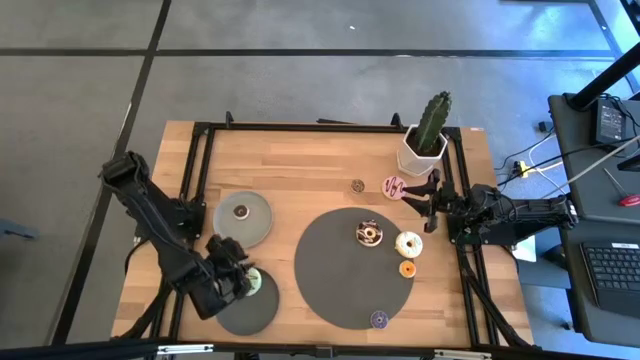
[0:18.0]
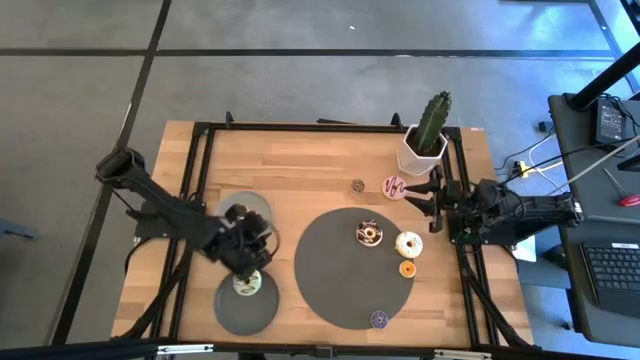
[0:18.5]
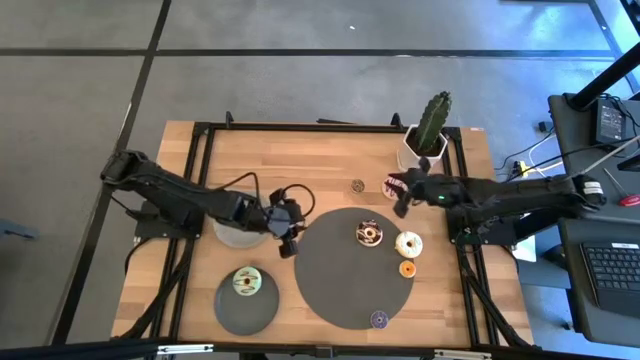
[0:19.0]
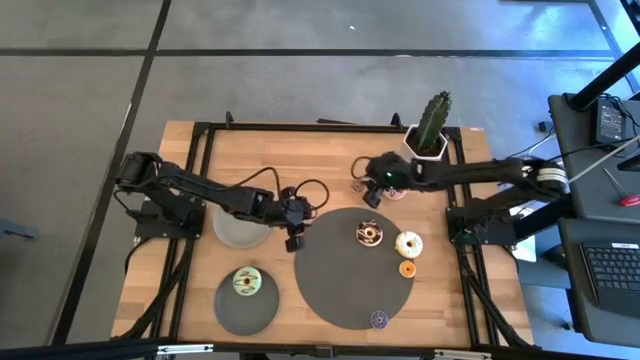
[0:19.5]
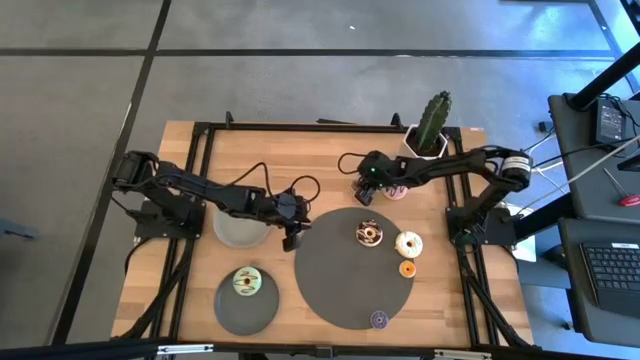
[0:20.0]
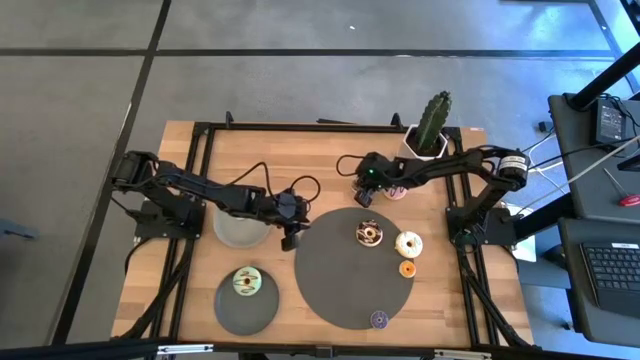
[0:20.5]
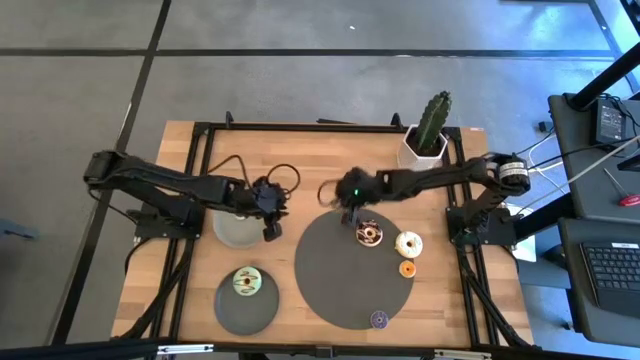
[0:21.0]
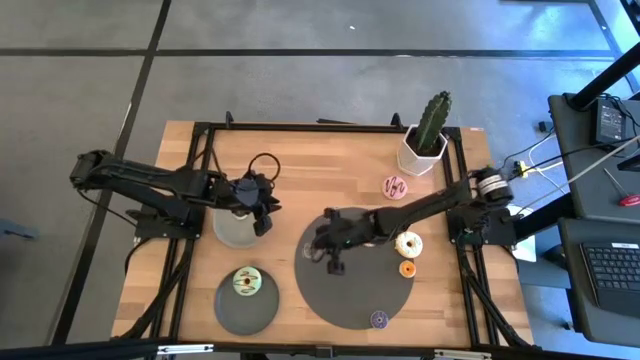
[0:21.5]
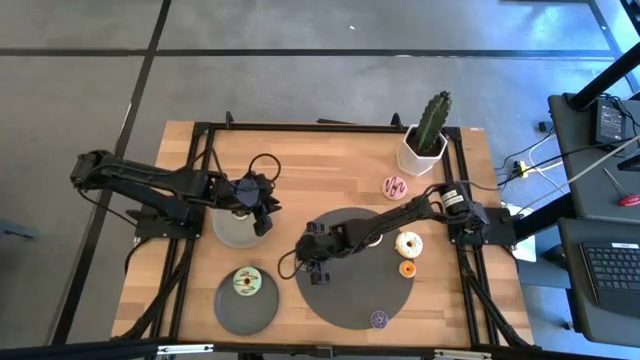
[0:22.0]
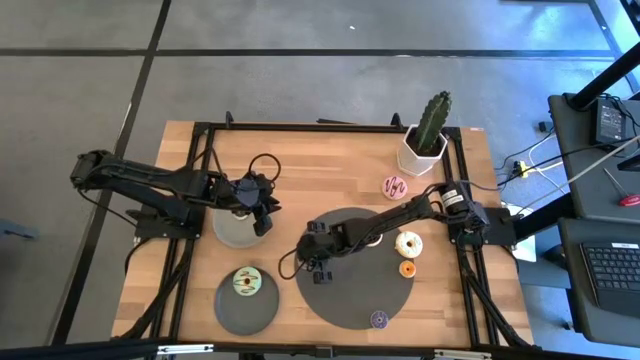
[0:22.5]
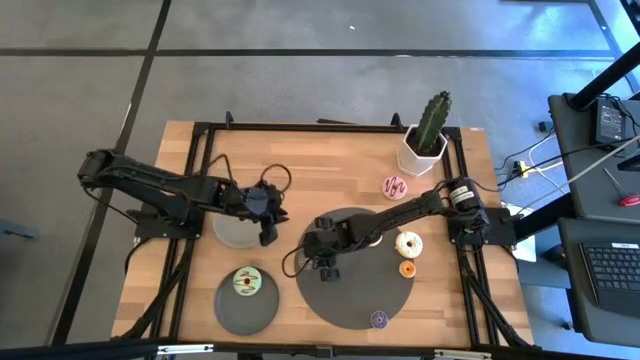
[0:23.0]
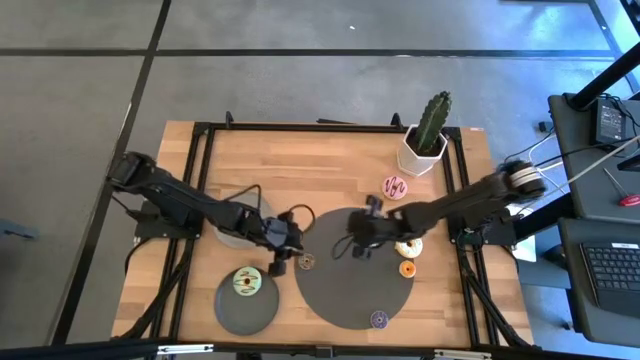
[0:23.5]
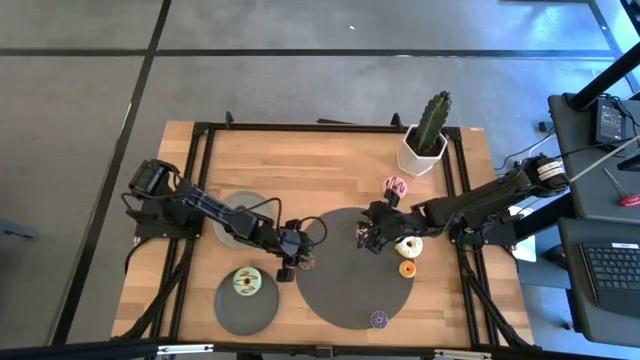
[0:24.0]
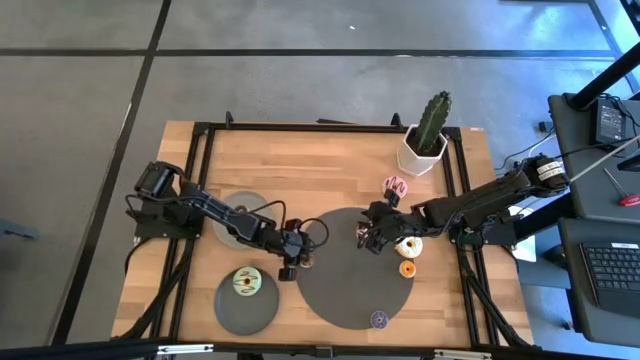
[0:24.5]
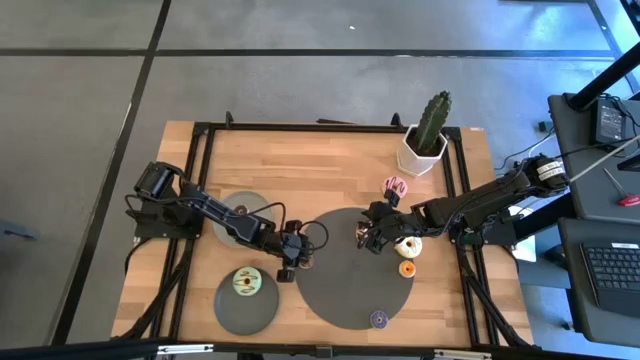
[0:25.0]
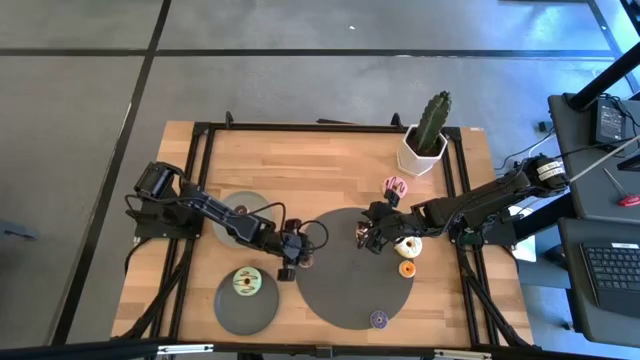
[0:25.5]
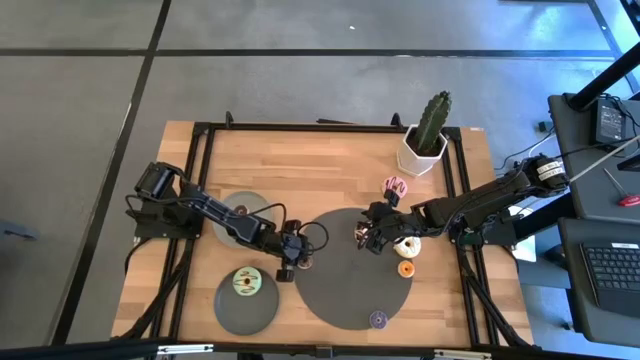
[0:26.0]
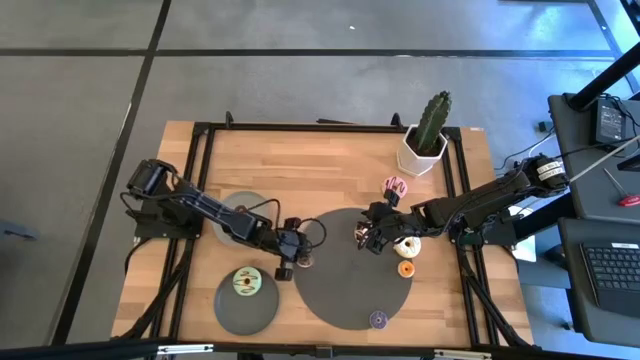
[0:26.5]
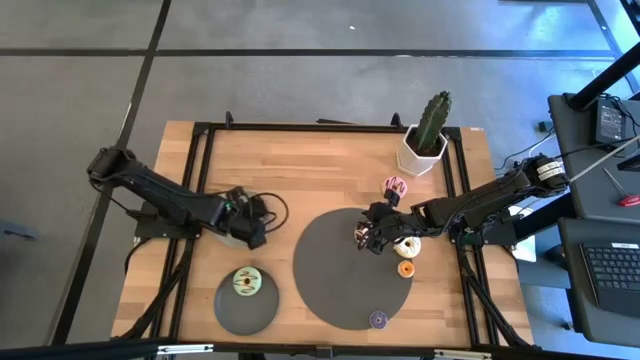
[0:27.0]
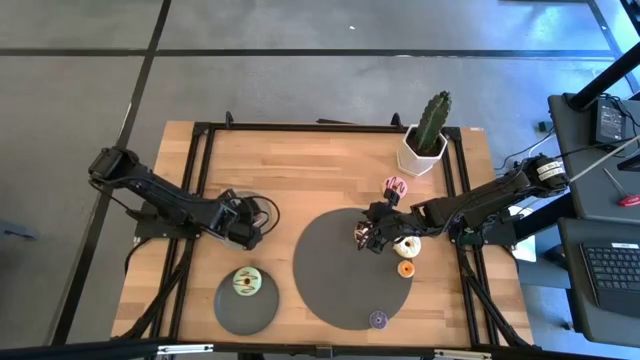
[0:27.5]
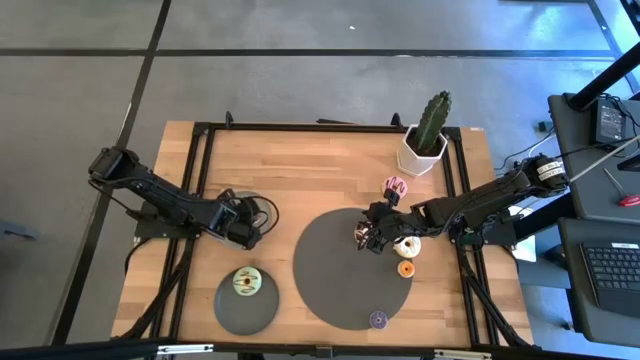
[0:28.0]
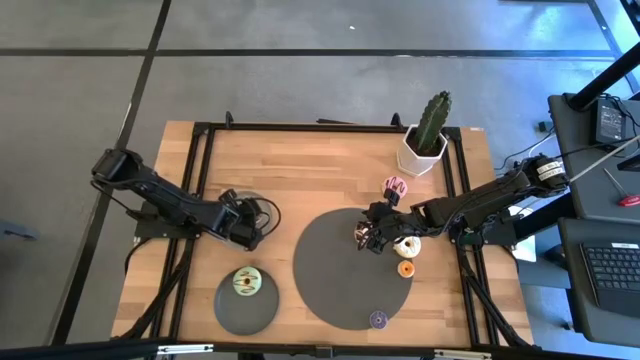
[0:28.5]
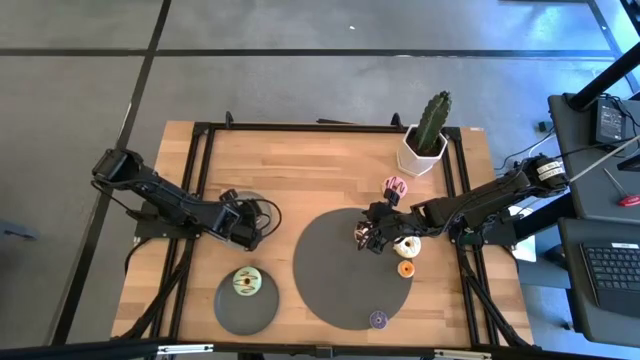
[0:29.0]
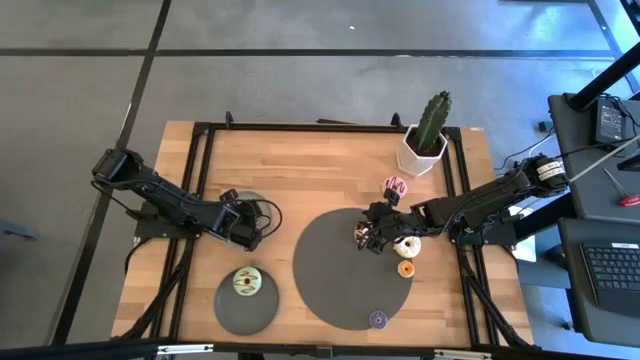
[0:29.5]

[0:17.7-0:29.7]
Task: Pick & Place donuts
Put the small brown donut on the gray plate

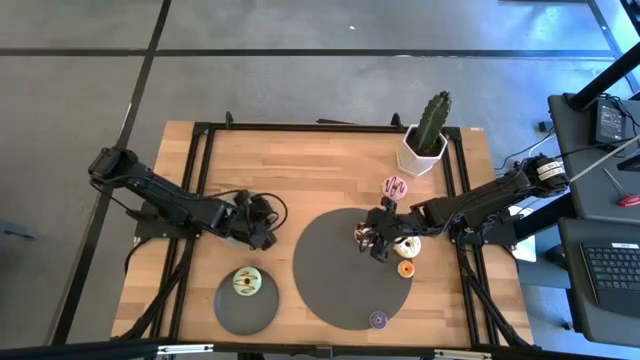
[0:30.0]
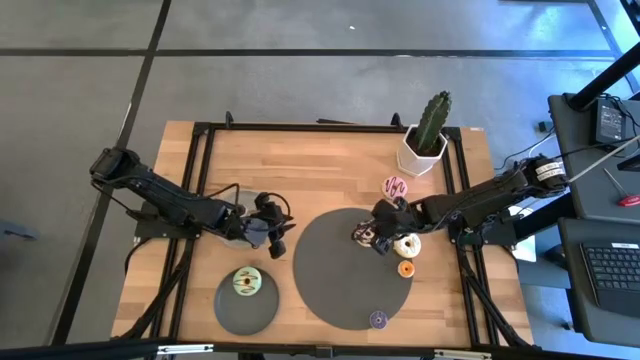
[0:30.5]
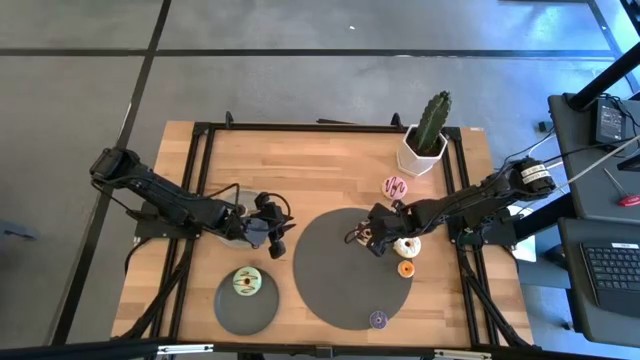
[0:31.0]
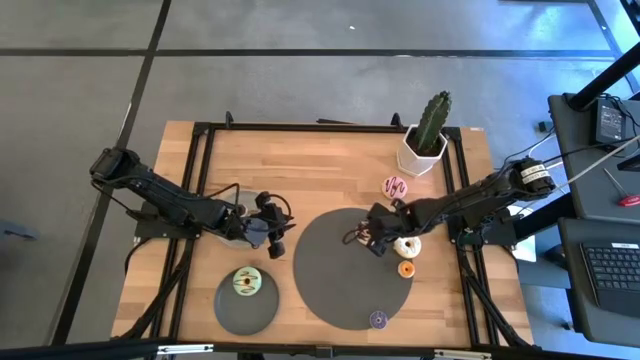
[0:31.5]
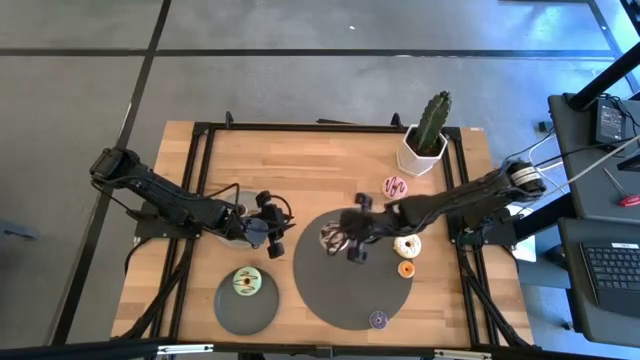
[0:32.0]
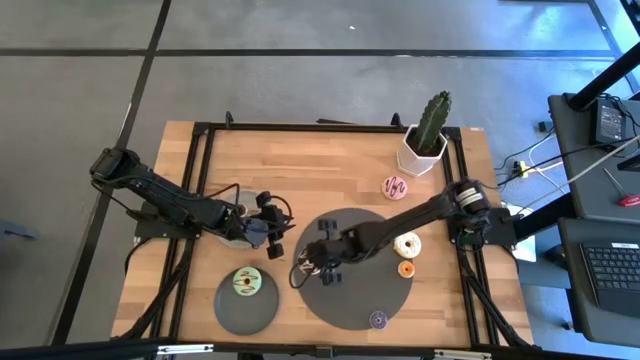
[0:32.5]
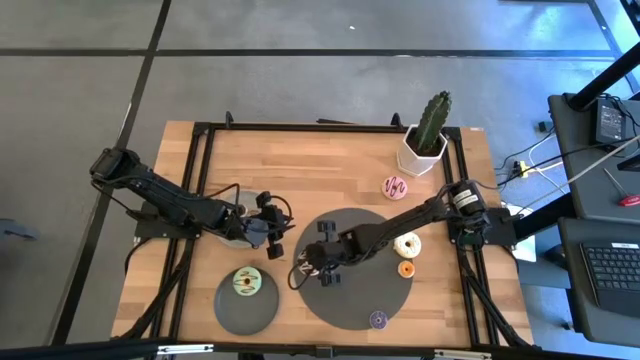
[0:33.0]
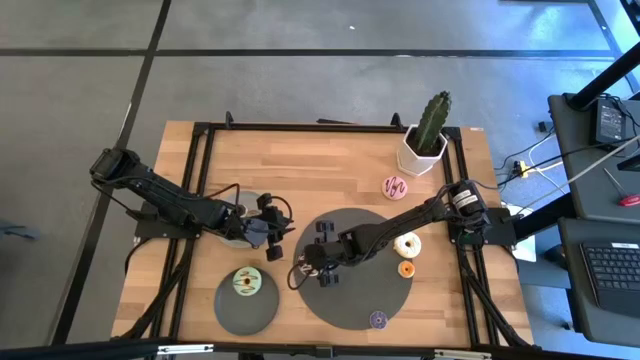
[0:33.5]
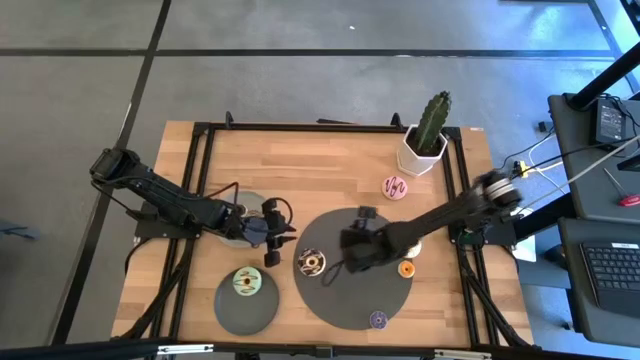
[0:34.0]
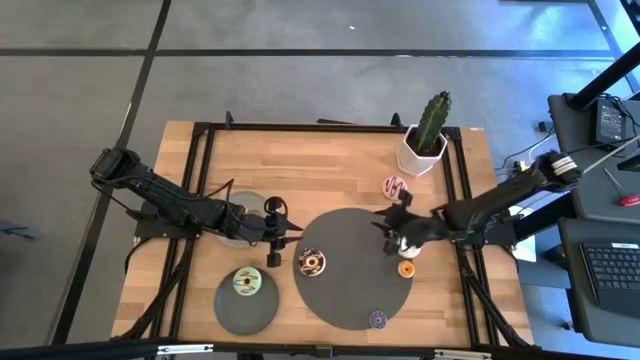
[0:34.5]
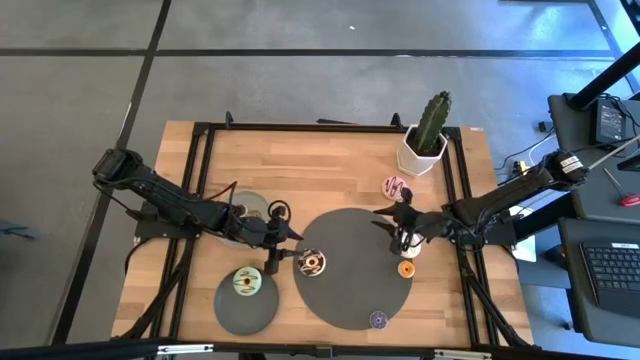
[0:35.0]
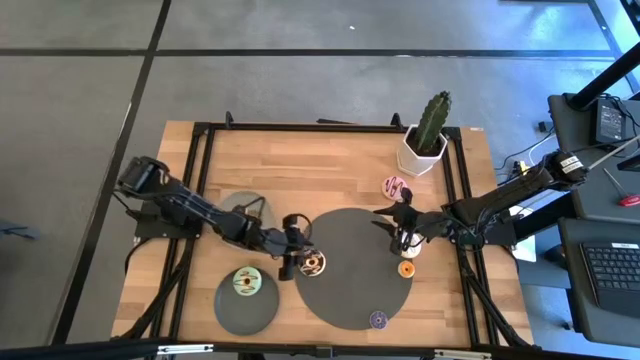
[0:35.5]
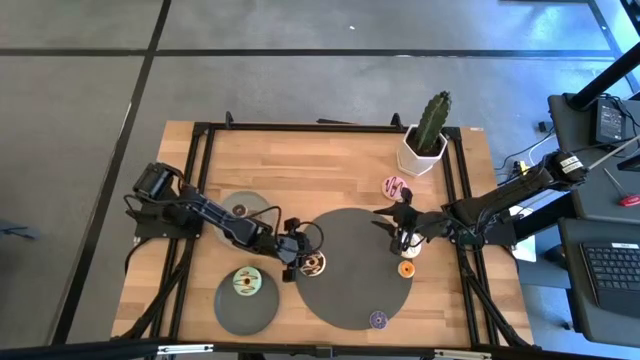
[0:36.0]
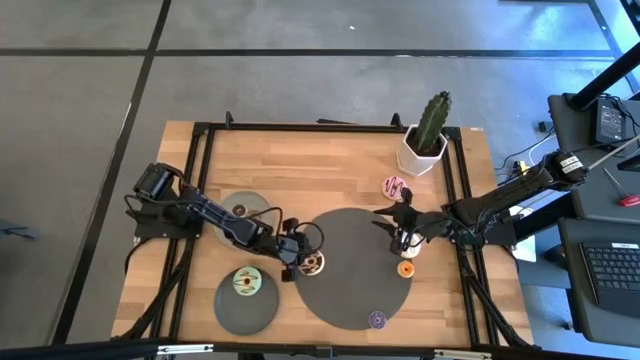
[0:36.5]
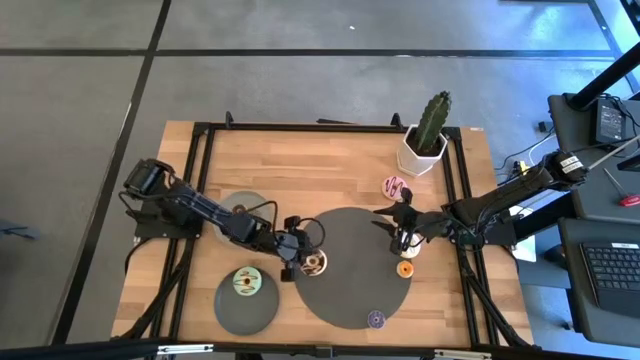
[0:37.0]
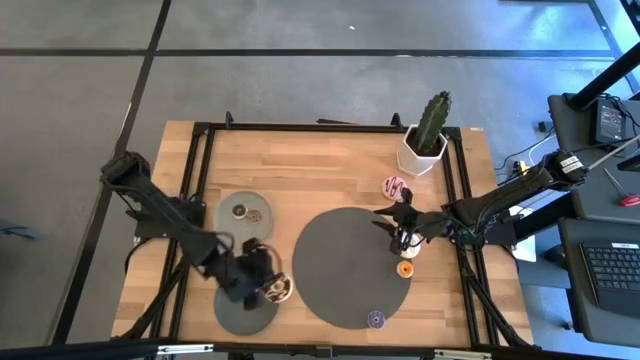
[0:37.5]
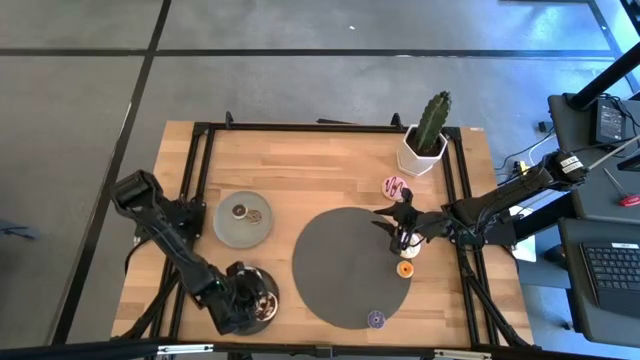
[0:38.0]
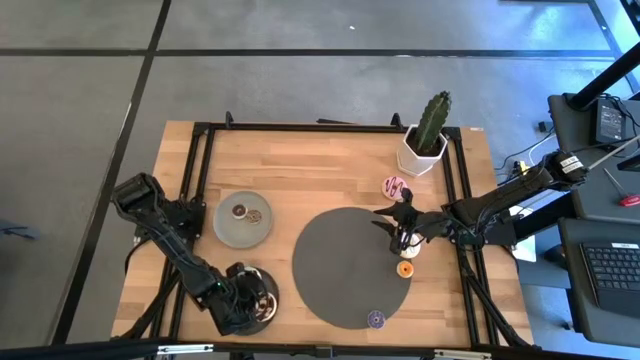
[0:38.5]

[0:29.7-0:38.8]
Put the large black donut on the black plate
